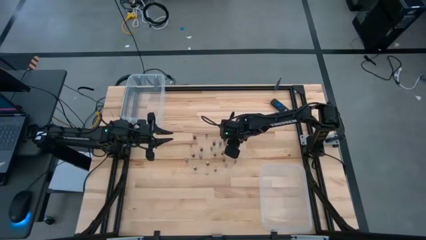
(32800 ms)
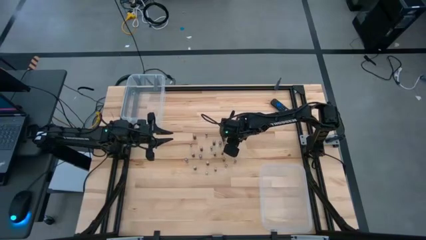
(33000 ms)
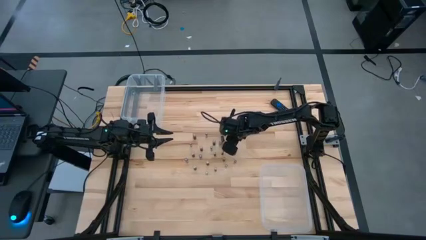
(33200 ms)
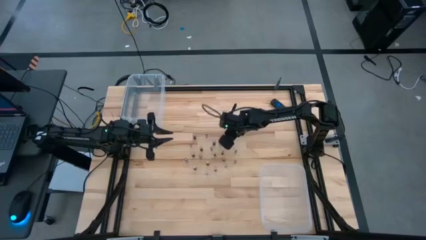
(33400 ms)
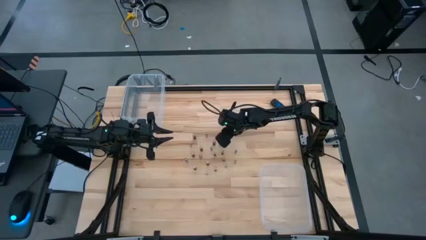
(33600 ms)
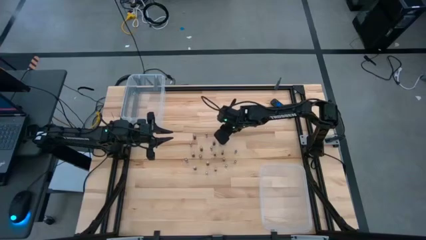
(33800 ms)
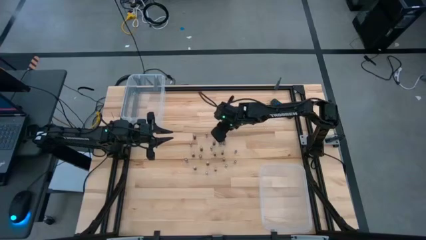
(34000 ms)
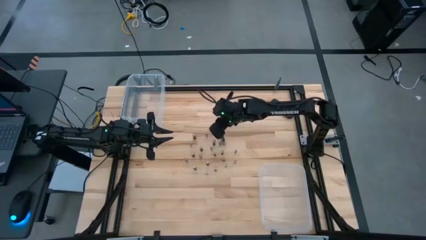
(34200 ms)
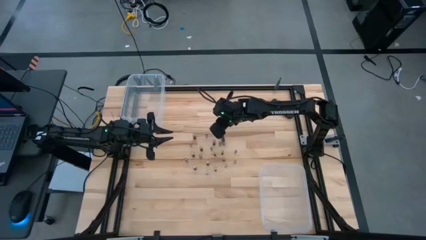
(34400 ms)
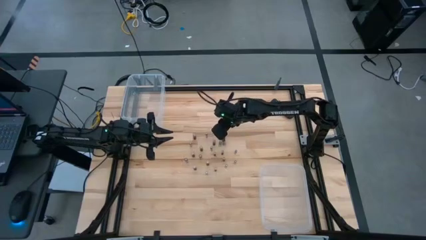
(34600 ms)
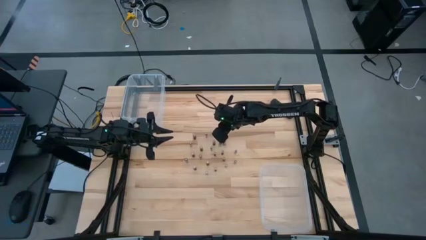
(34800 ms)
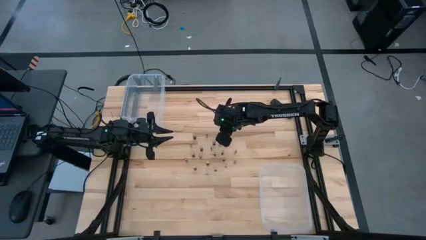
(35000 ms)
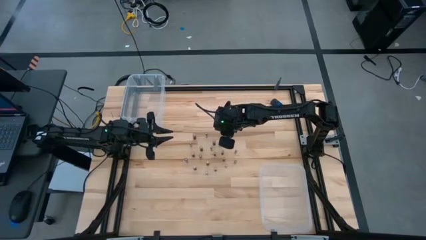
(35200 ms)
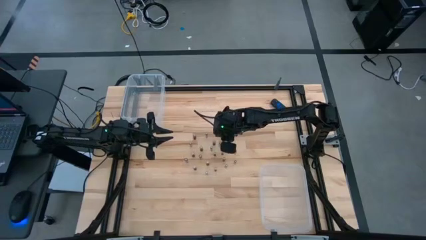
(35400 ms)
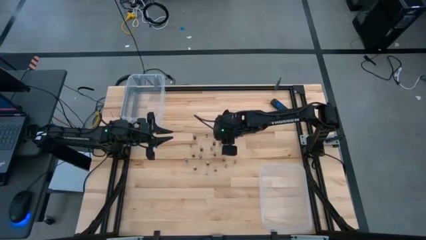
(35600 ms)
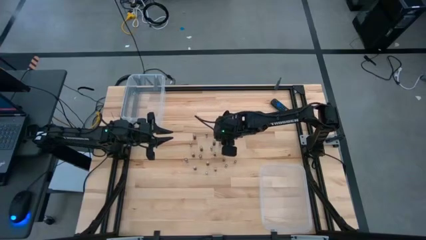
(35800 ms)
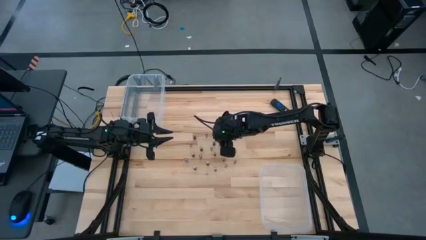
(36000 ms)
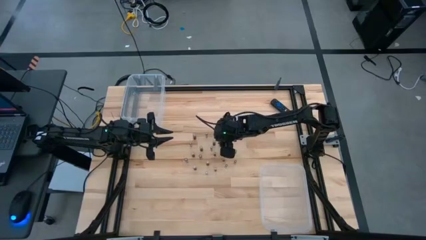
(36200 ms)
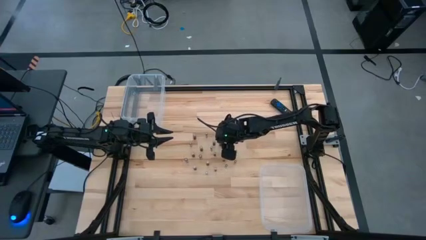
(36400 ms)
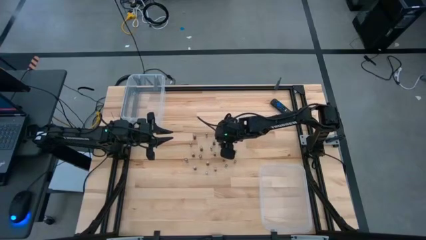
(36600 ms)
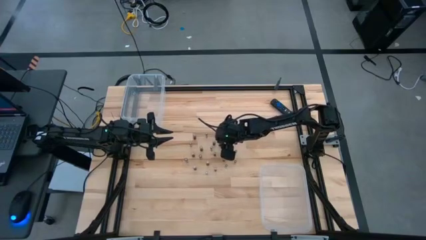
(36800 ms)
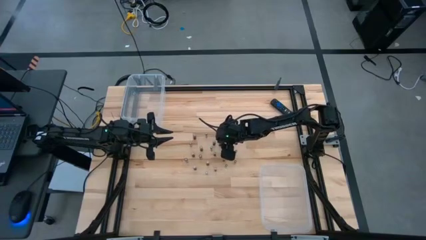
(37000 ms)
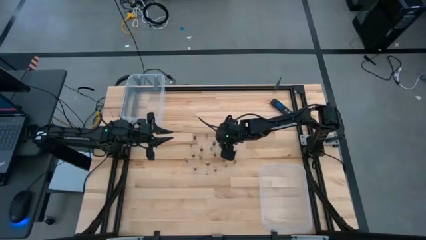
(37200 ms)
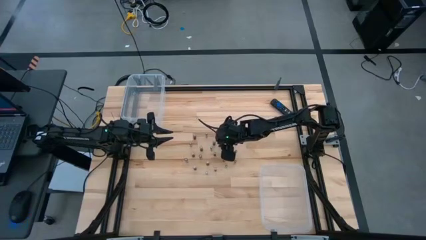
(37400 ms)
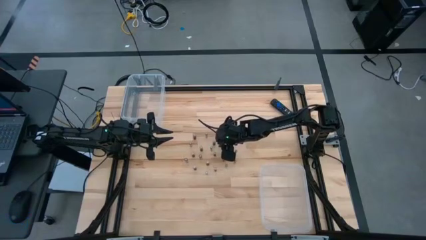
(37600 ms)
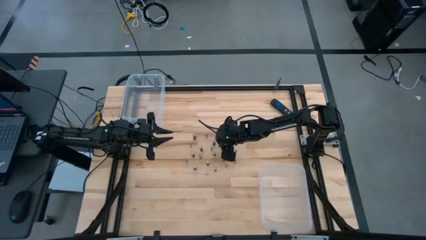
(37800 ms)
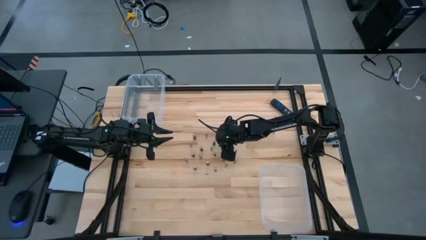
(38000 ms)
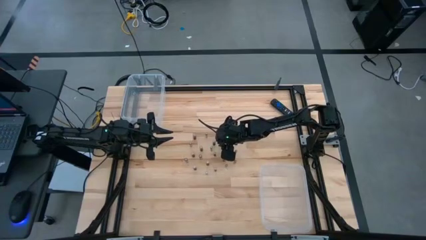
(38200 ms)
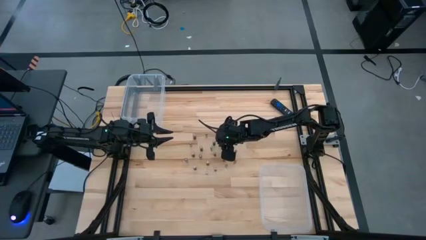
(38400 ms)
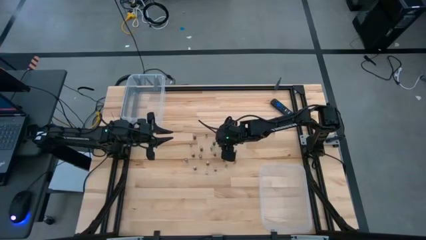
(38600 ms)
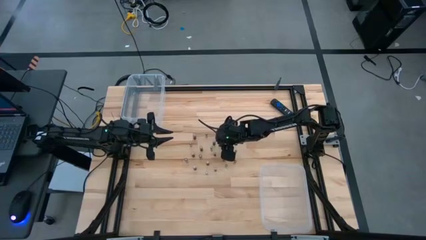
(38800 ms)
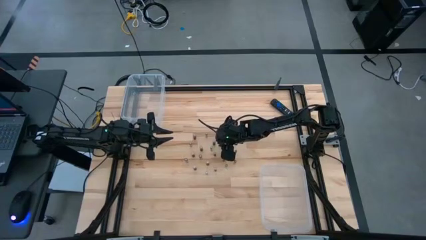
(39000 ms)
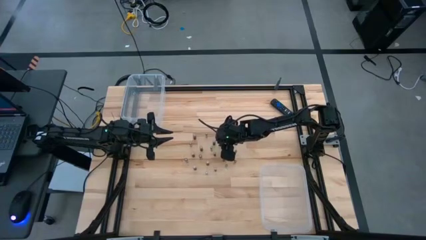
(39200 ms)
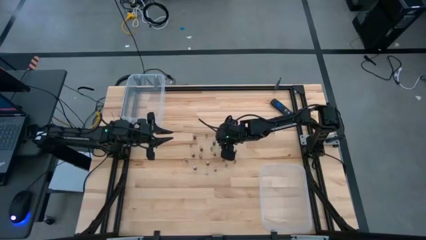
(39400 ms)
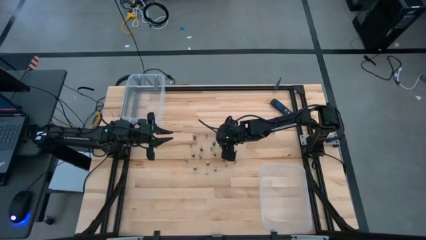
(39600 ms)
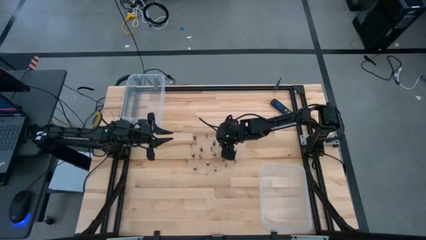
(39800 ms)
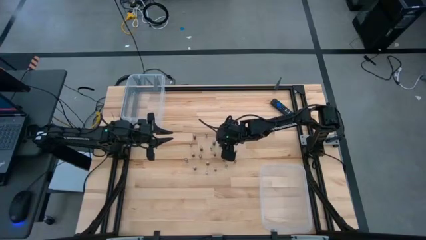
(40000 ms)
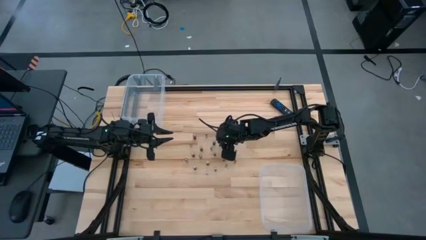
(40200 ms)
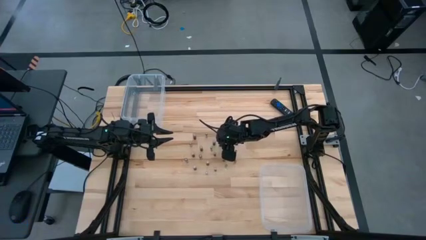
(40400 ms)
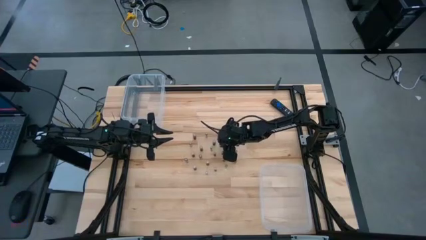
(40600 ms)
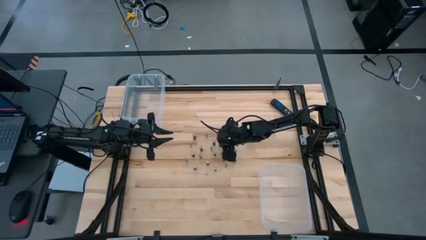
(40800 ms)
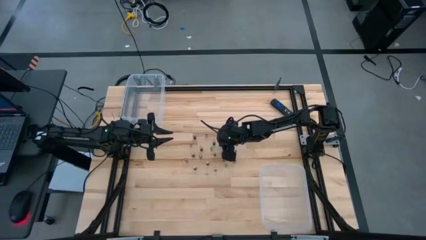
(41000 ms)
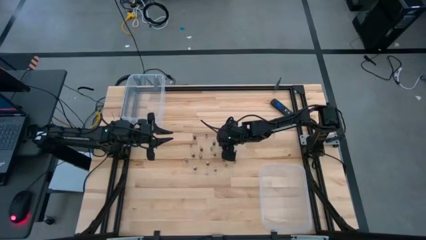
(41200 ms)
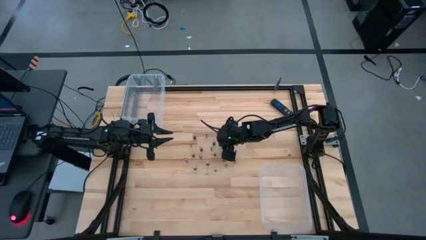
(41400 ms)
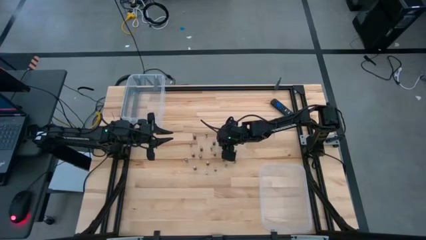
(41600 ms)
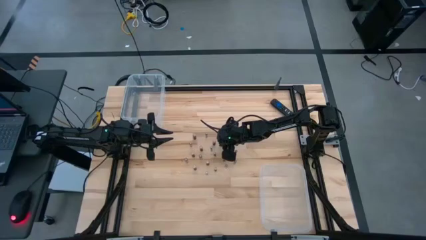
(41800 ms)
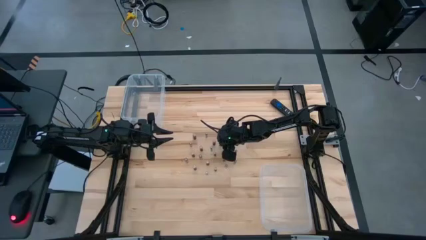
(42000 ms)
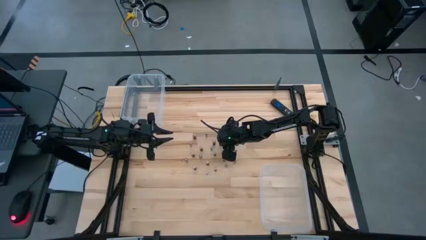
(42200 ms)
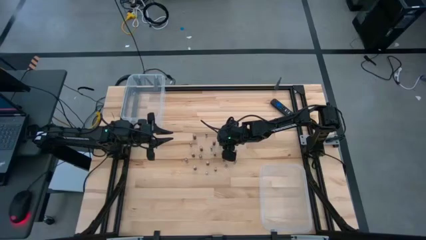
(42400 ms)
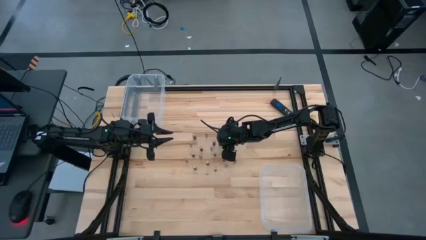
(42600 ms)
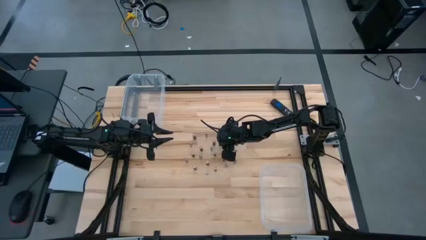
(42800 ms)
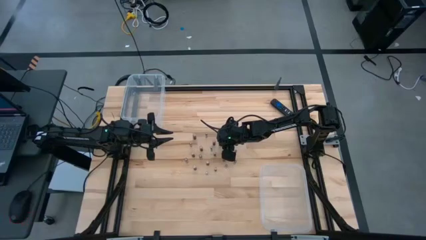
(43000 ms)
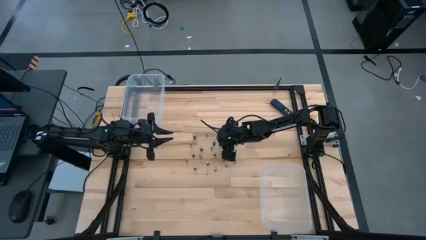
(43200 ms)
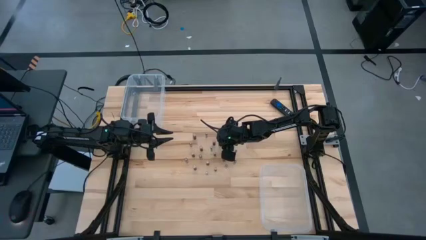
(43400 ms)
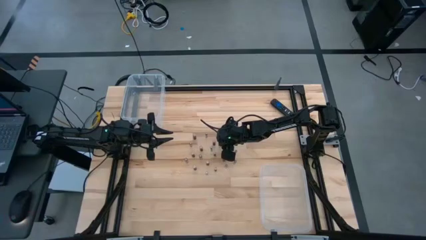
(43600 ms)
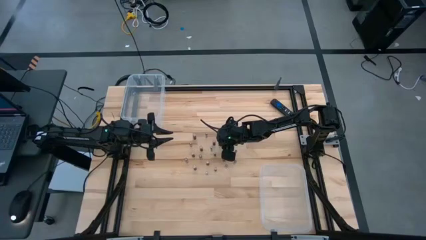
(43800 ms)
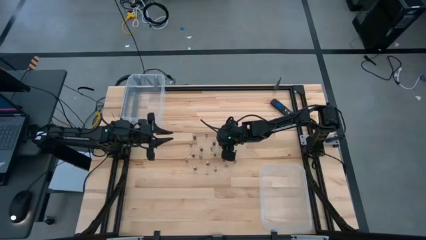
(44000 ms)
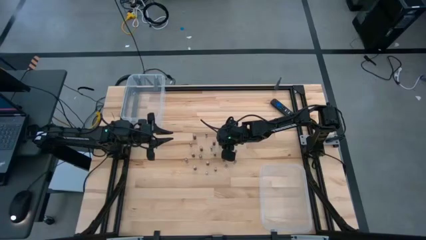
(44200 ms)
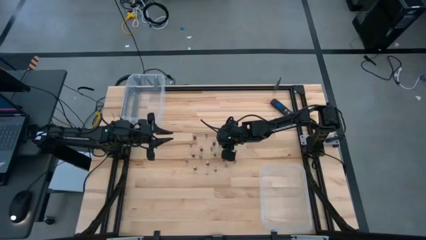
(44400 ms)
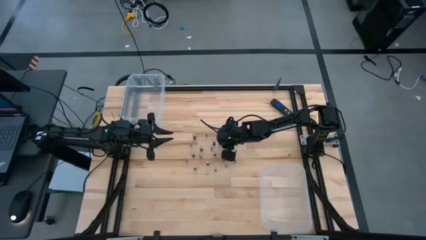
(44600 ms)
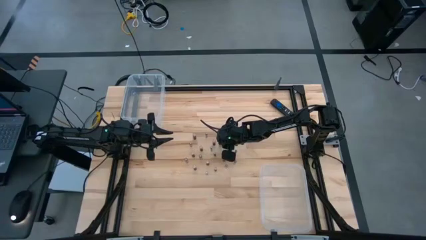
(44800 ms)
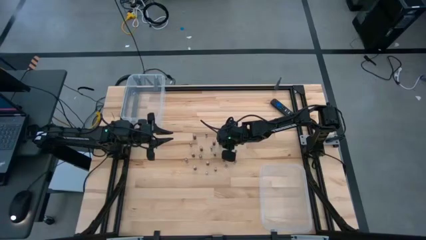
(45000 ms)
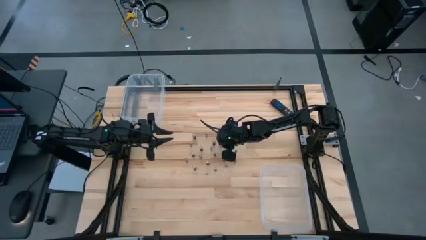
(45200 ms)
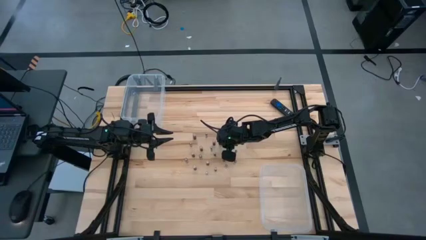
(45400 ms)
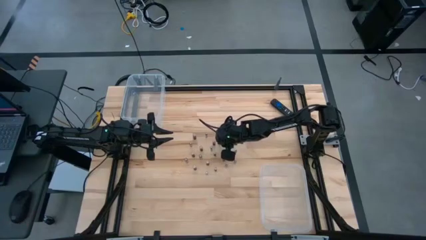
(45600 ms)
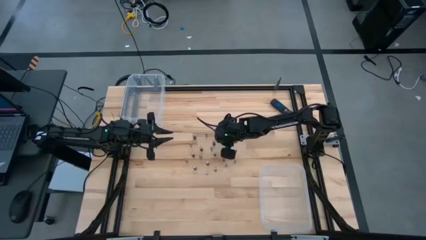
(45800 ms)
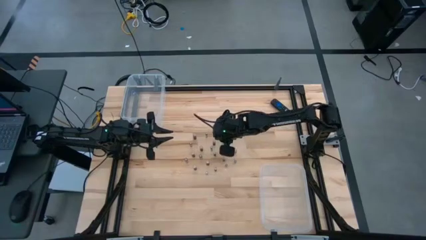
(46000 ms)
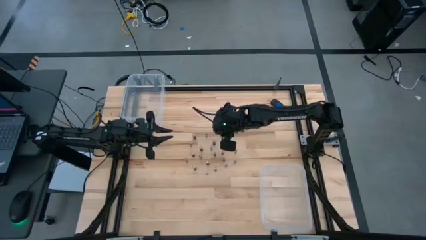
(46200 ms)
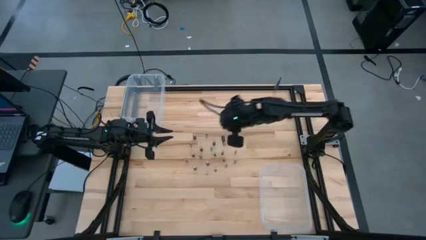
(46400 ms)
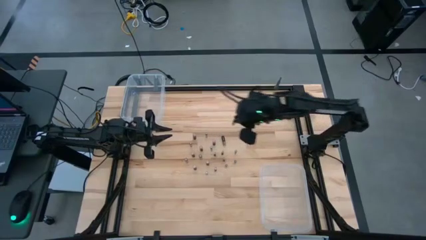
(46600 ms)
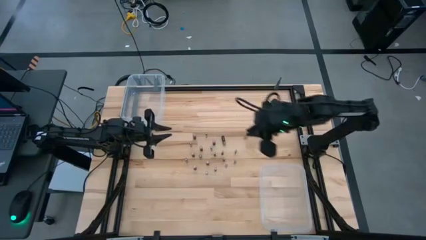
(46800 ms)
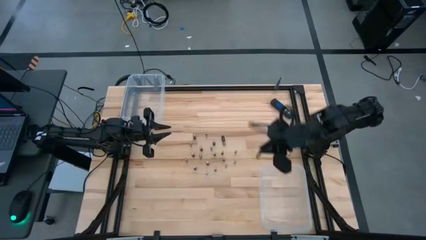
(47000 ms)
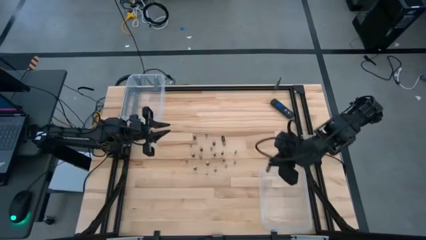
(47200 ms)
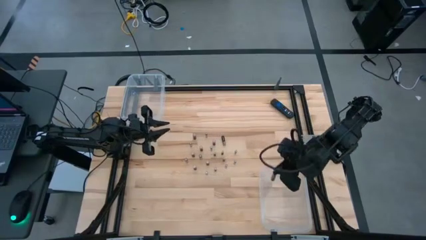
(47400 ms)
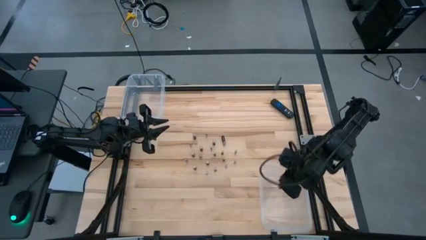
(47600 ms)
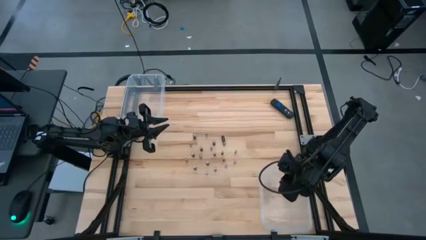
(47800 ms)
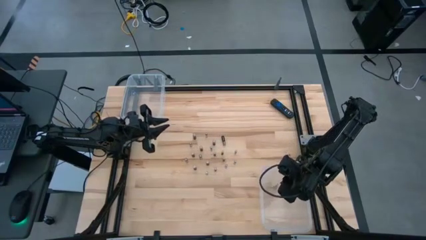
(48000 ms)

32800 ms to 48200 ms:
Task: Sort batteries
Put the black and silver battery into the bottom transparent bin
